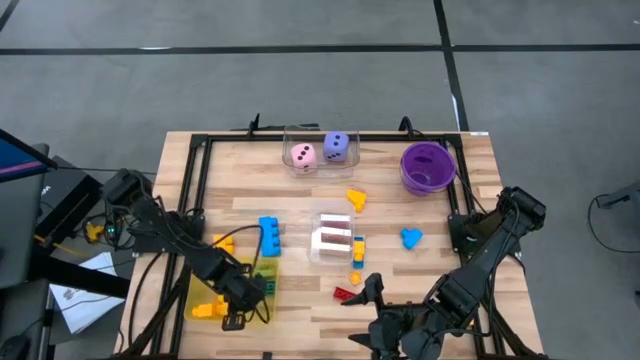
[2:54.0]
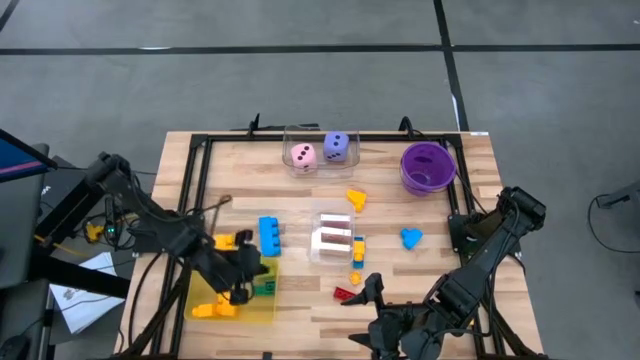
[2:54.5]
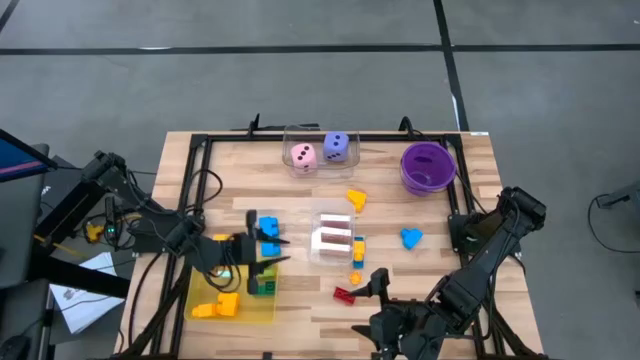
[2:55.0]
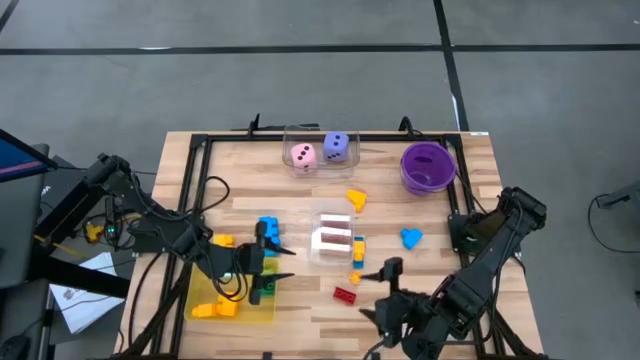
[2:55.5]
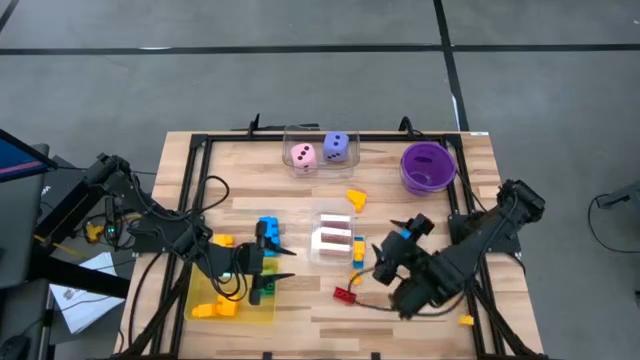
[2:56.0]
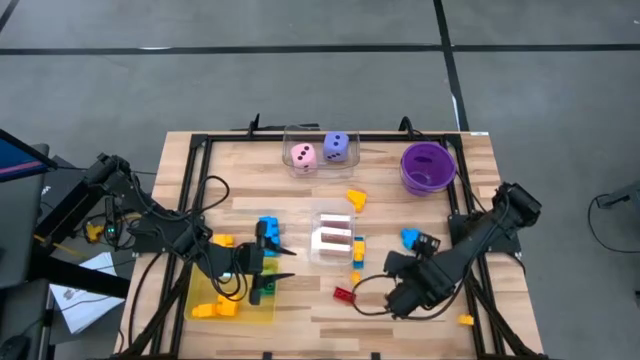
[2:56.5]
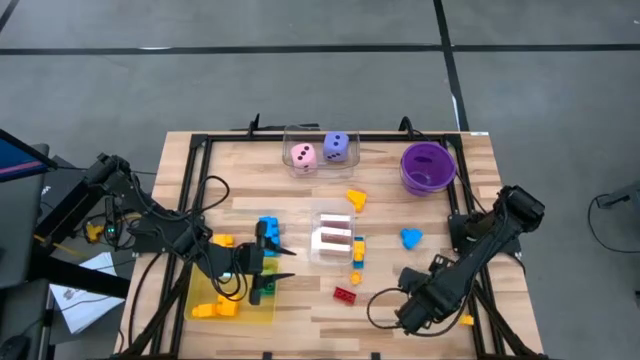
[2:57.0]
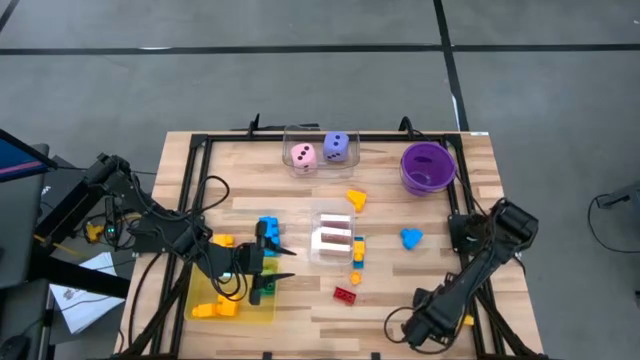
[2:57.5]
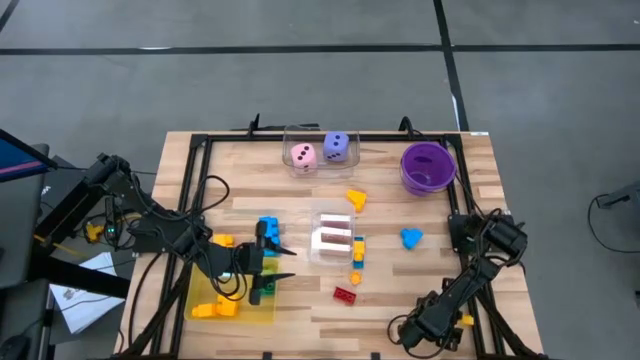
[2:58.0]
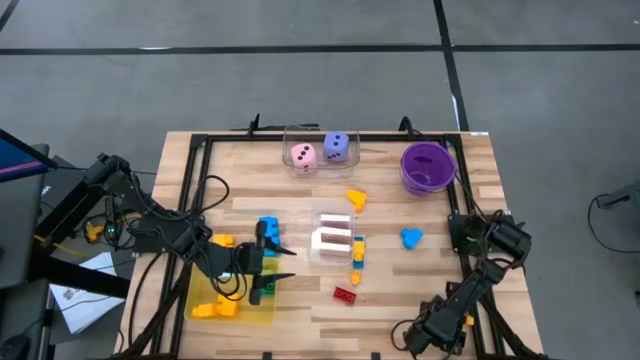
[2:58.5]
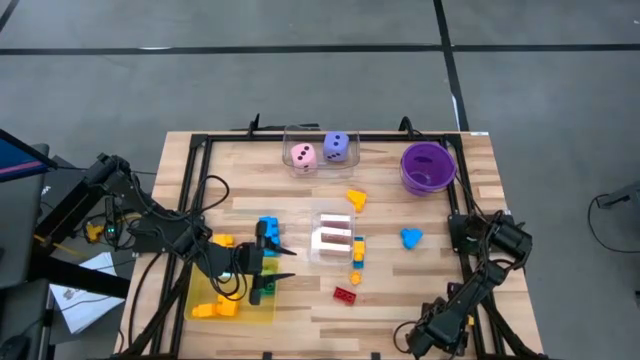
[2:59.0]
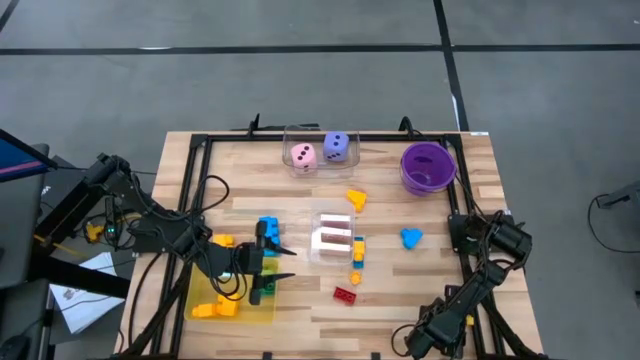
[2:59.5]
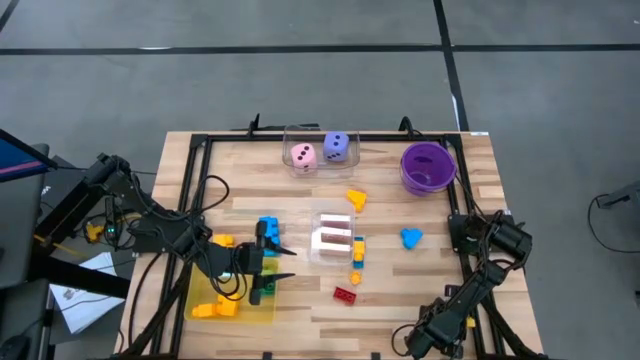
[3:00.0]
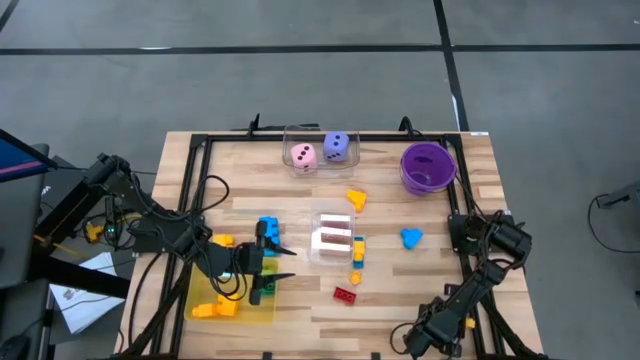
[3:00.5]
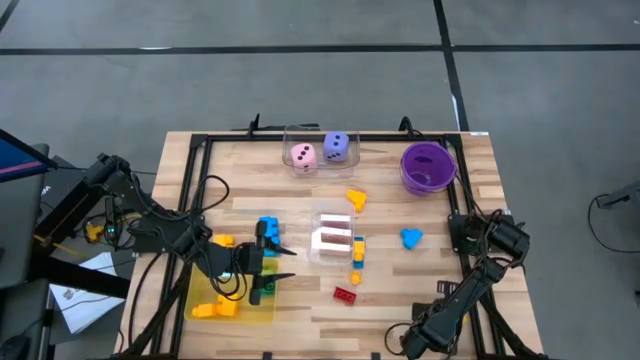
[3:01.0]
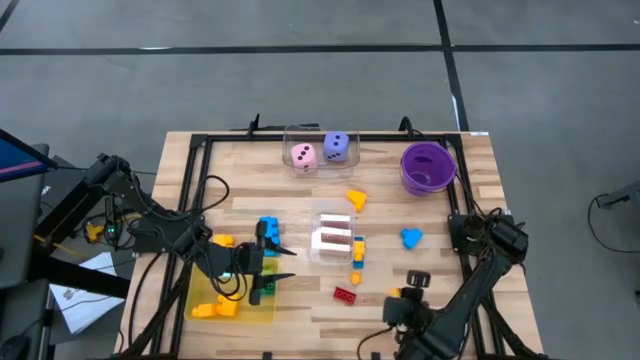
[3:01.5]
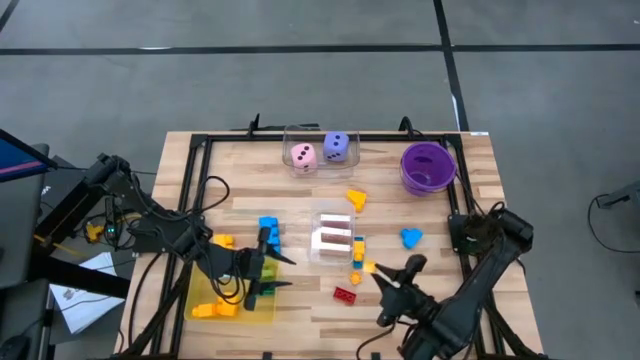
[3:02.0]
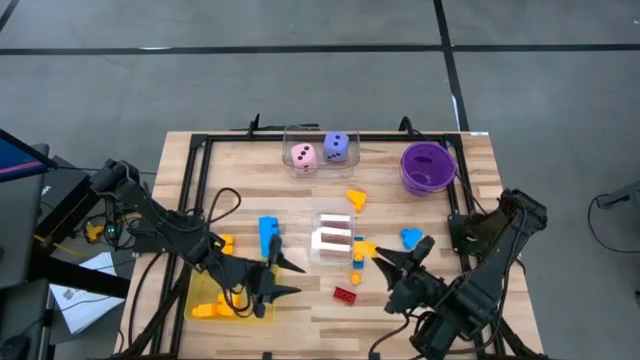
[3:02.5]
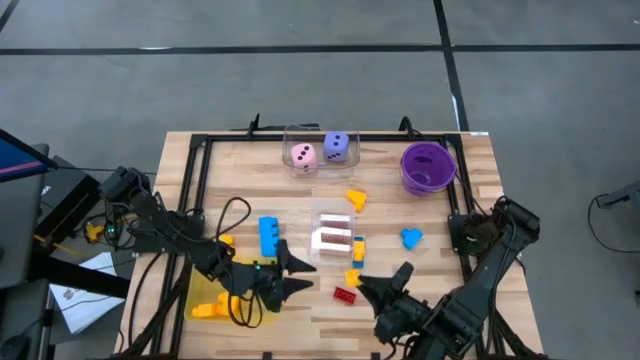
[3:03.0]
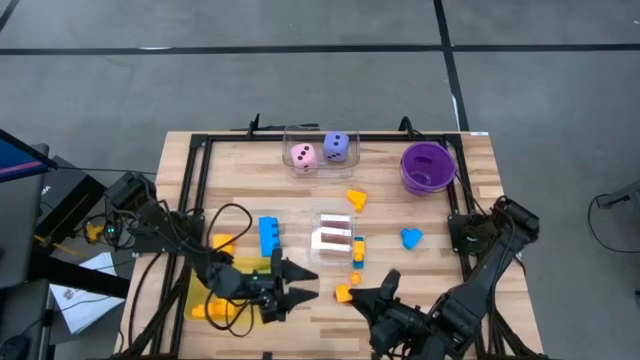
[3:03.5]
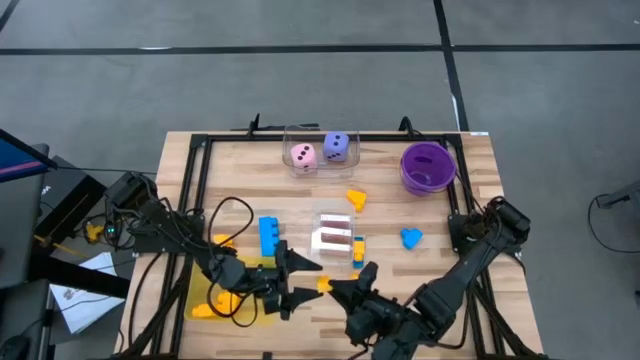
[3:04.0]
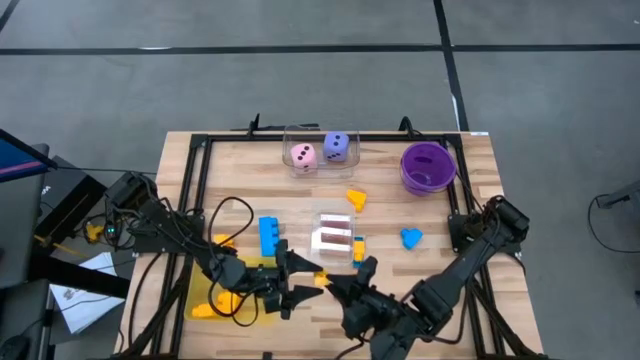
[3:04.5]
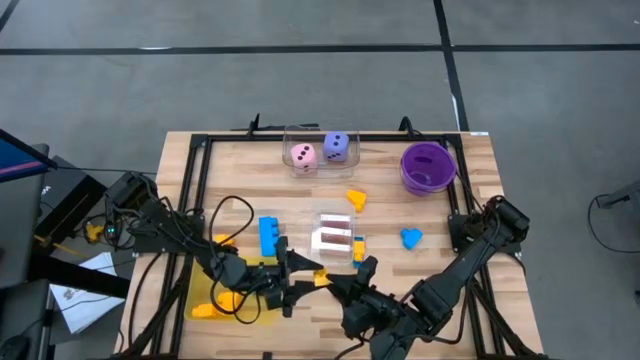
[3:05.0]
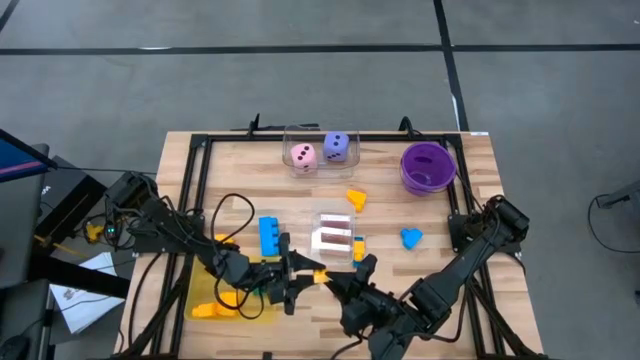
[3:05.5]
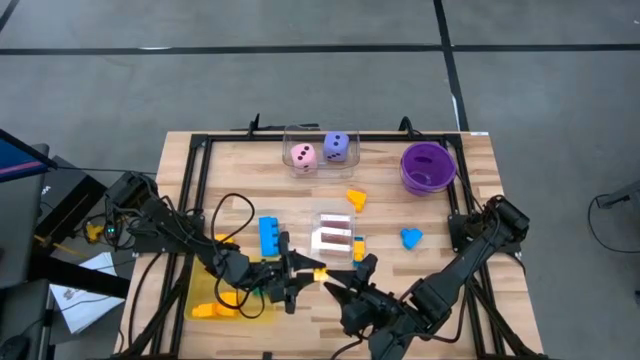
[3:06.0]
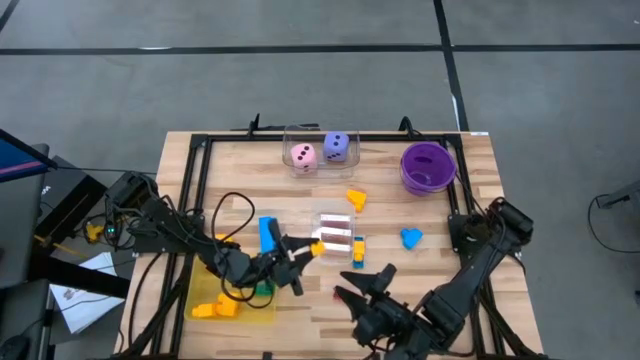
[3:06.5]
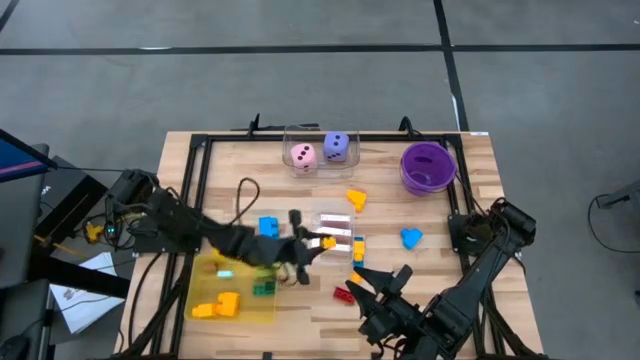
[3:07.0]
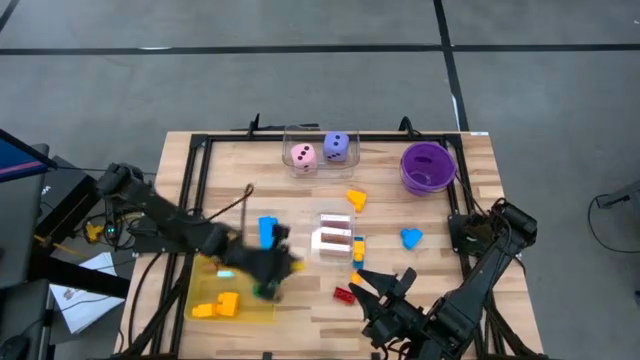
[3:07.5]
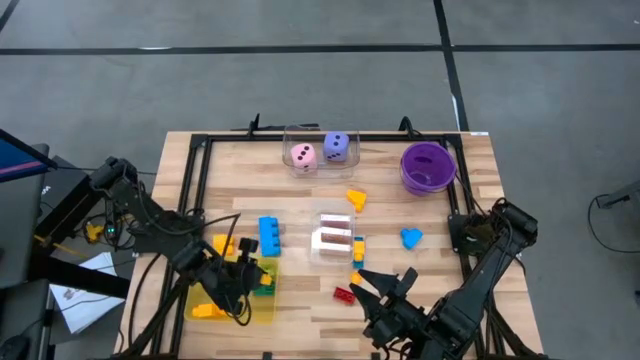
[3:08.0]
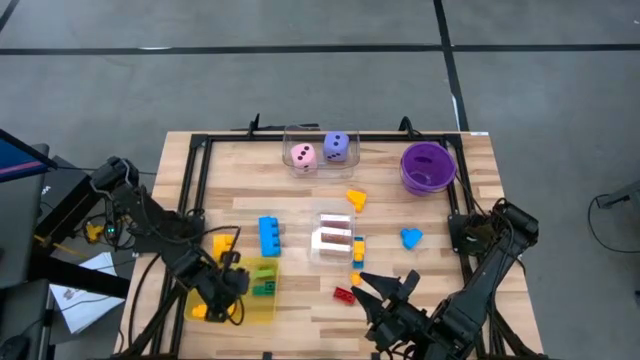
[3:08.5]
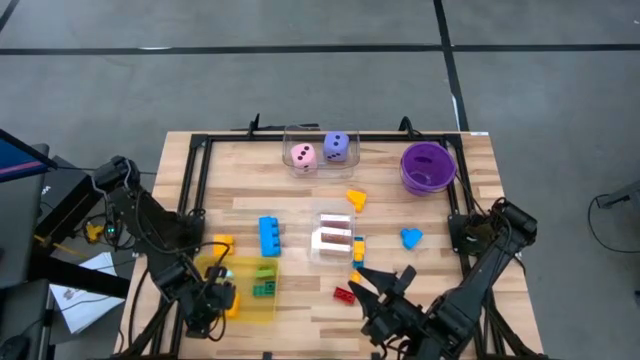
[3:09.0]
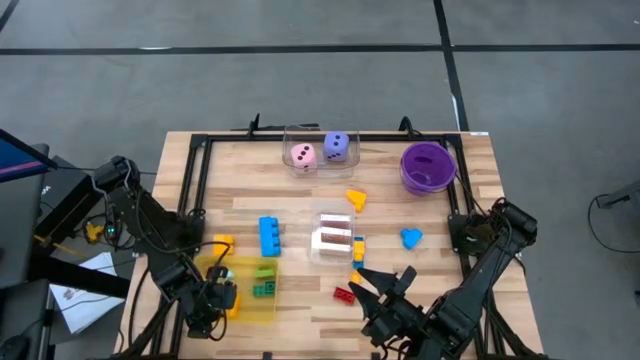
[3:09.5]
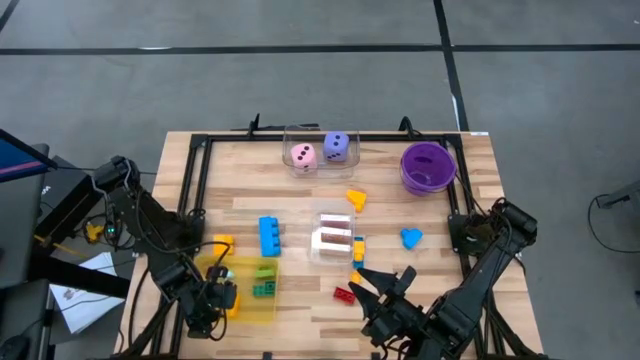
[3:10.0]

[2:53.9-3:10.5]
Task: Pick & Place Toys
Put the yellow game piece into the yellow bin

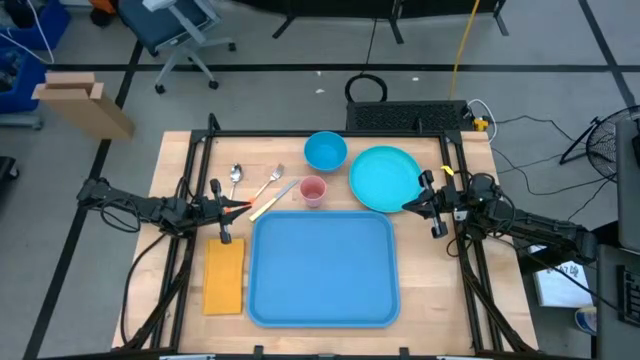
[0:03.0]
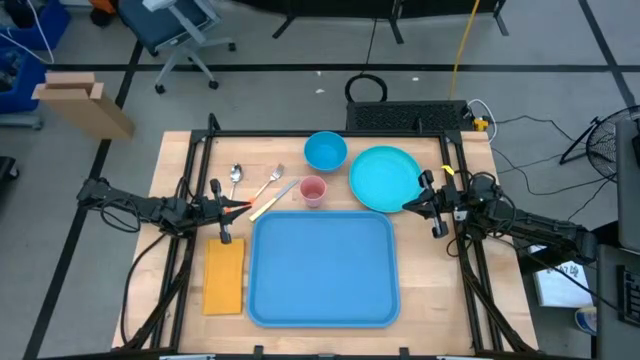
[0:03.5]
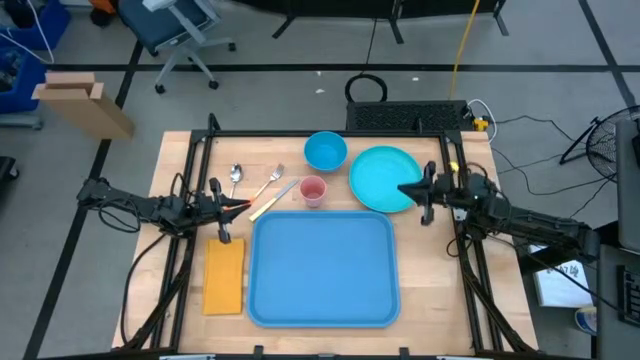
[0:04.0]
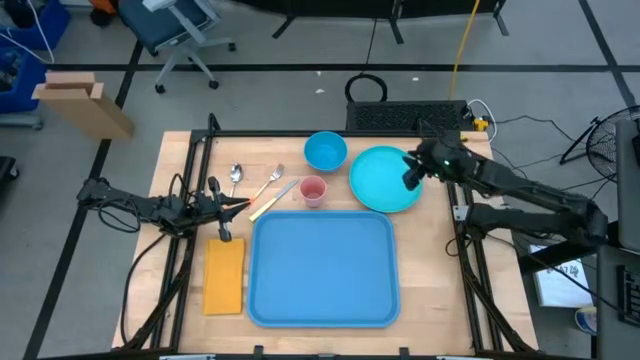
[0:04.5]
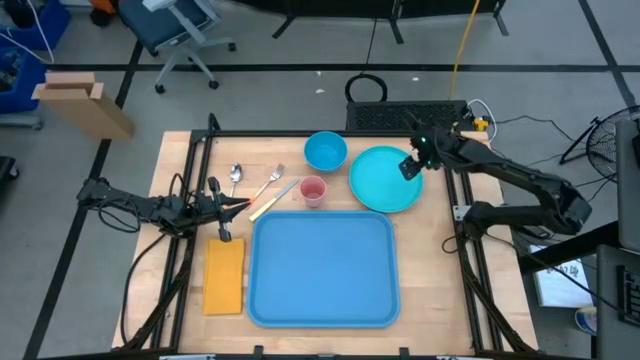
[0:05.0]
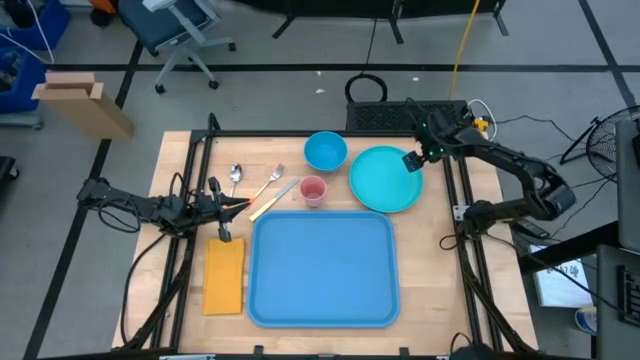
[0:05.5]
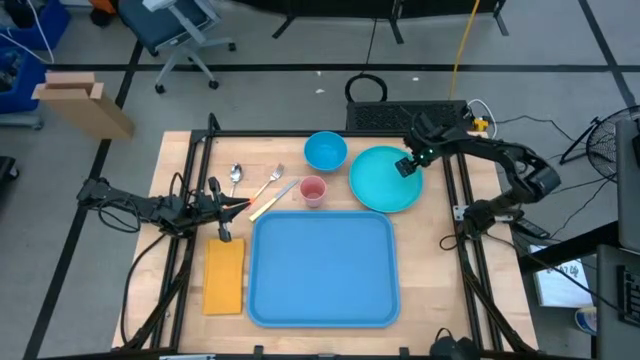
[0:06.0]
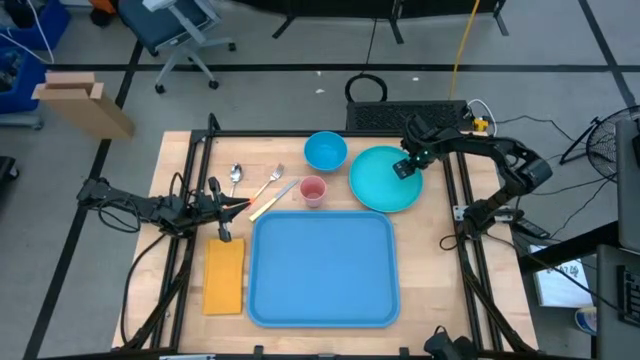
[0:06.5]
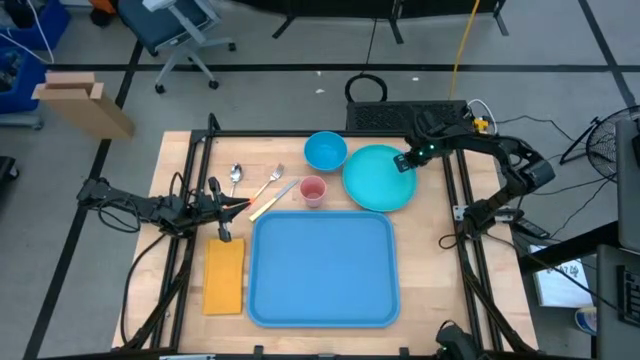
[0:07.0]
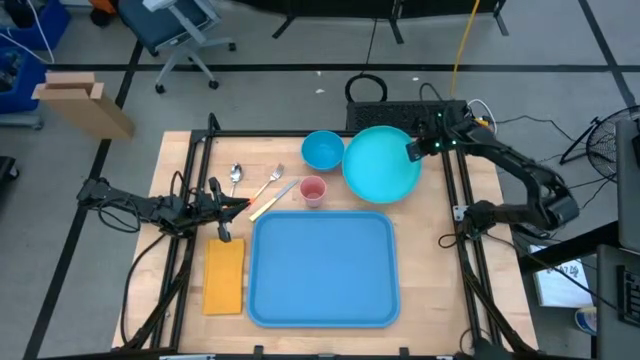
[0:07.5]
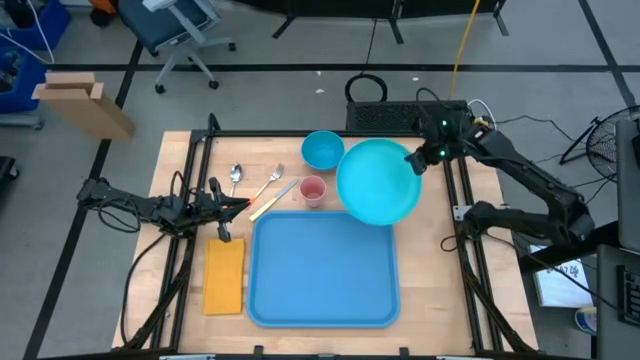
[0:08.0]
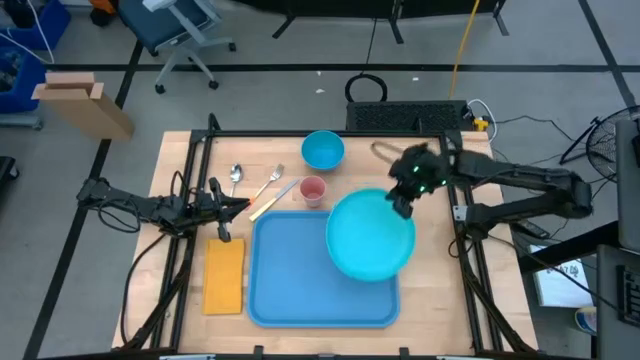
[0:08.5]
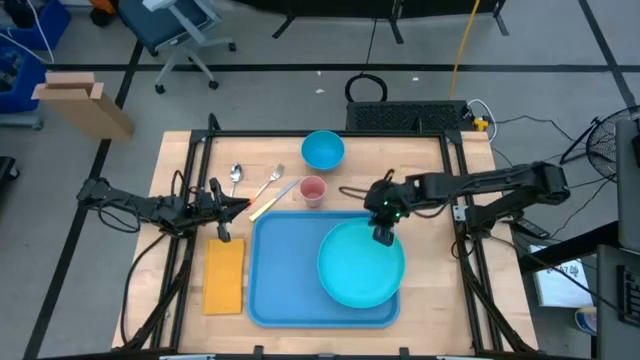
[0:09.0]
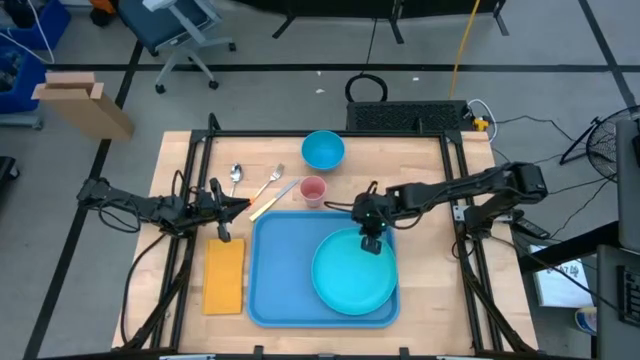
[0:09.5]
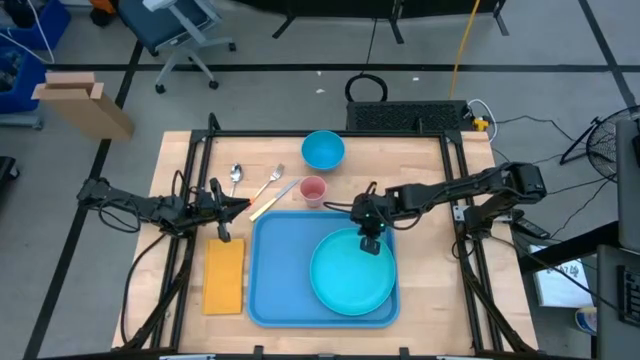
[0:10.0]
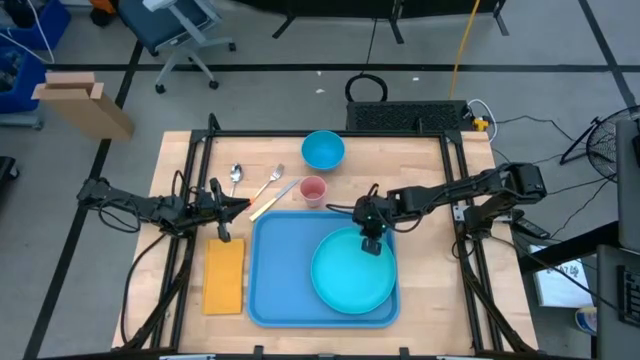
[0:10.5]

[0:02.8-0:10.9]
Task: Set up tray
Put the green plate on the blue tray
